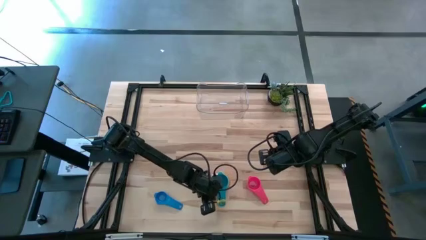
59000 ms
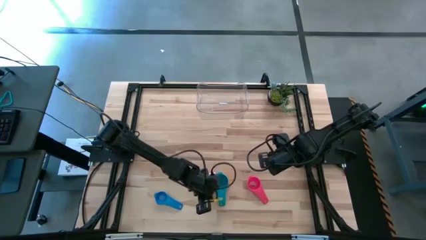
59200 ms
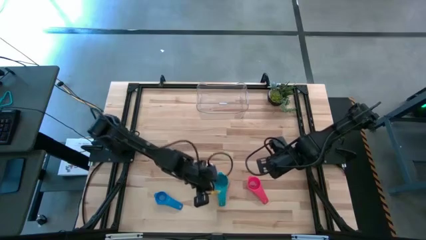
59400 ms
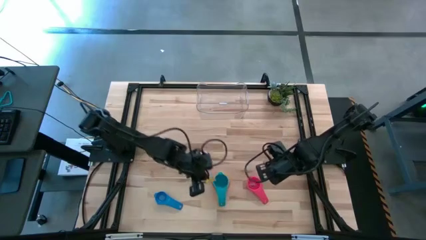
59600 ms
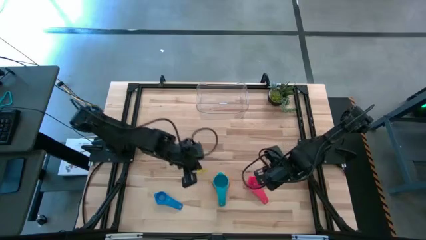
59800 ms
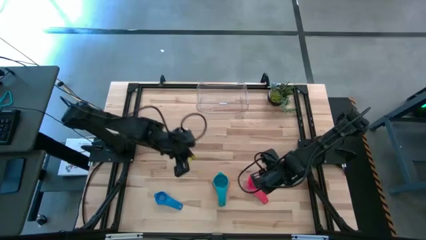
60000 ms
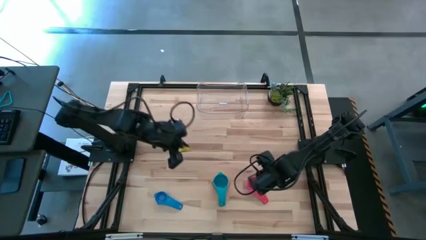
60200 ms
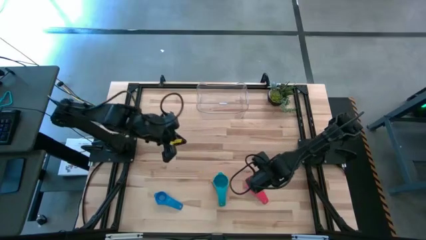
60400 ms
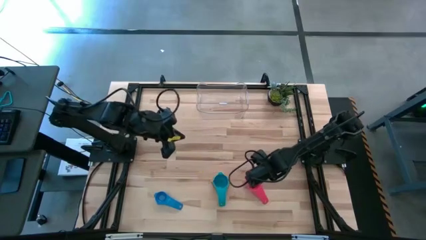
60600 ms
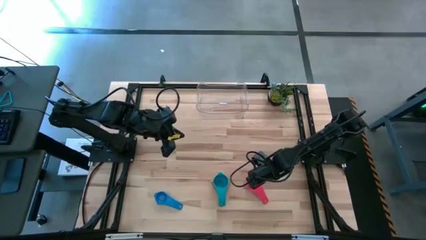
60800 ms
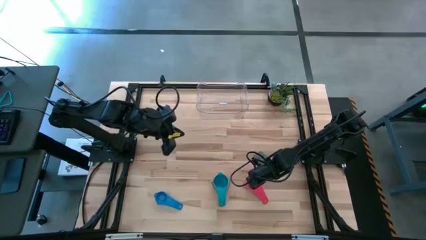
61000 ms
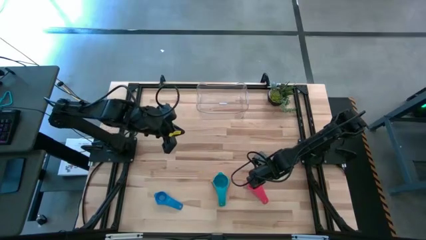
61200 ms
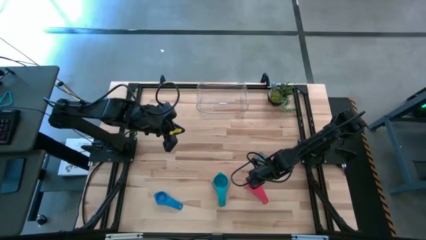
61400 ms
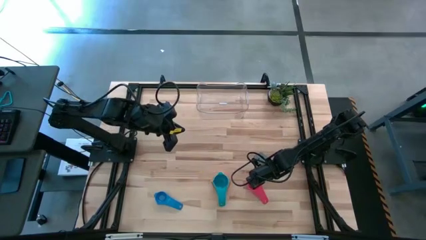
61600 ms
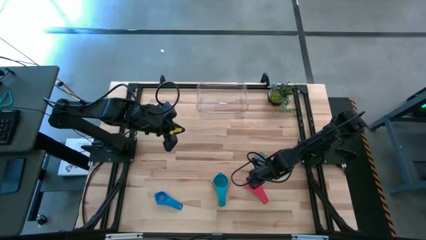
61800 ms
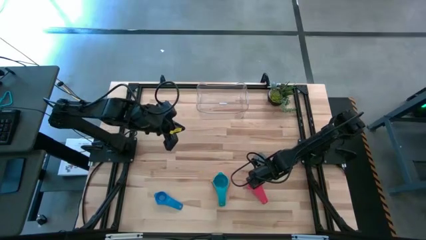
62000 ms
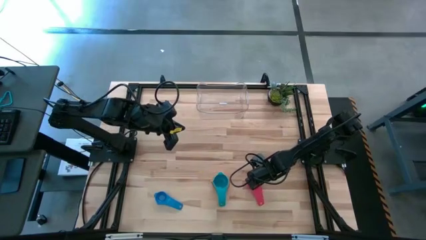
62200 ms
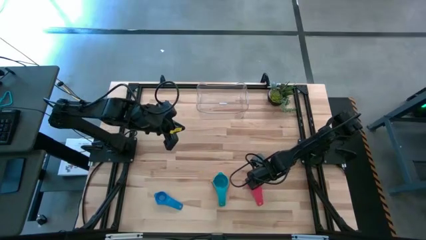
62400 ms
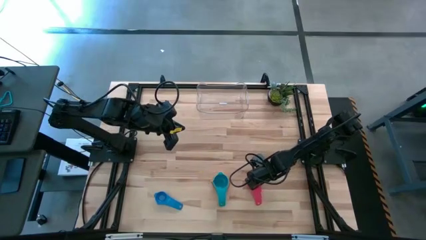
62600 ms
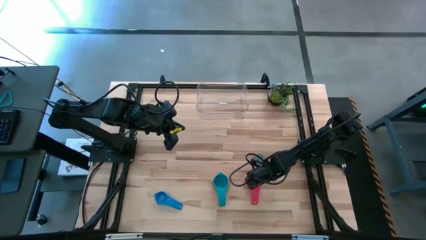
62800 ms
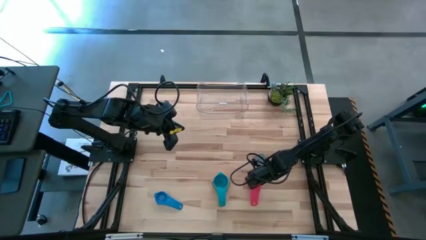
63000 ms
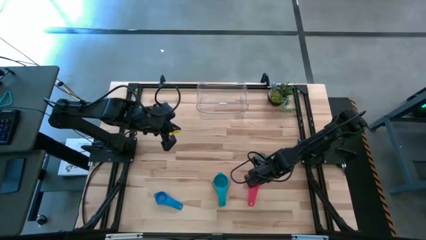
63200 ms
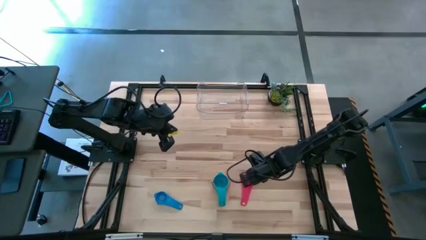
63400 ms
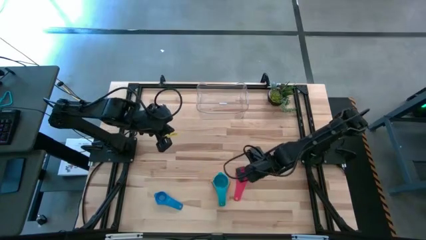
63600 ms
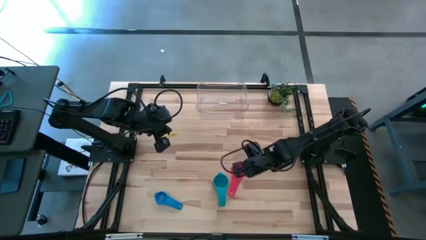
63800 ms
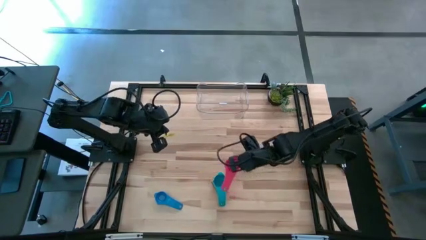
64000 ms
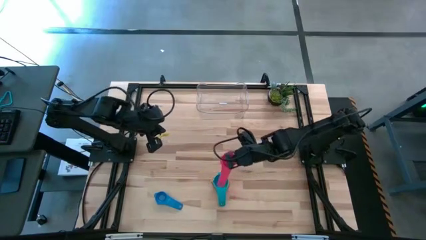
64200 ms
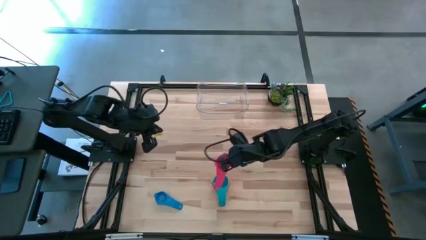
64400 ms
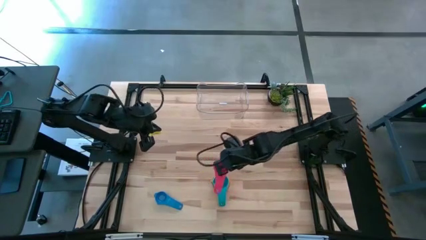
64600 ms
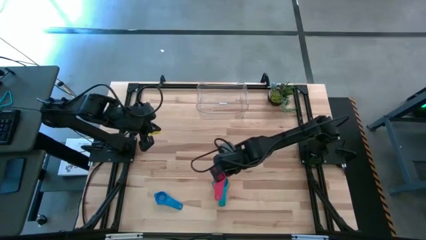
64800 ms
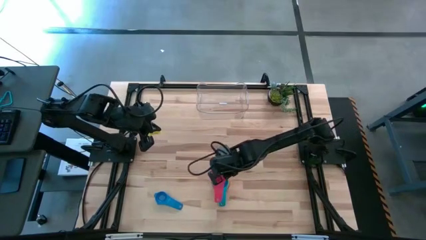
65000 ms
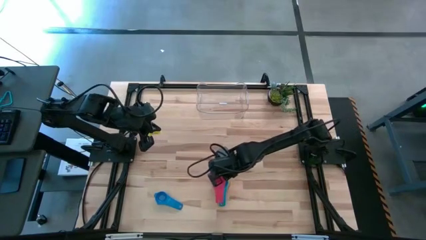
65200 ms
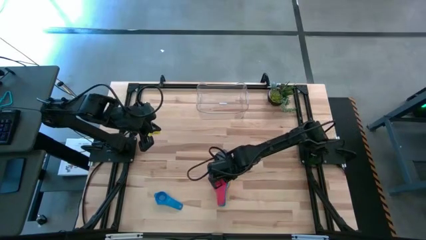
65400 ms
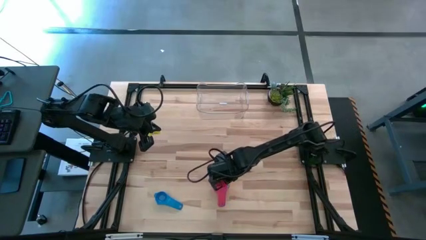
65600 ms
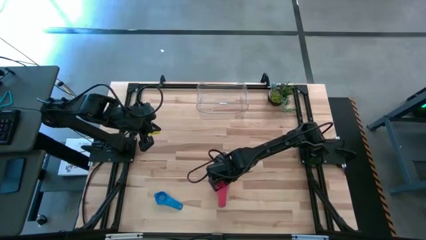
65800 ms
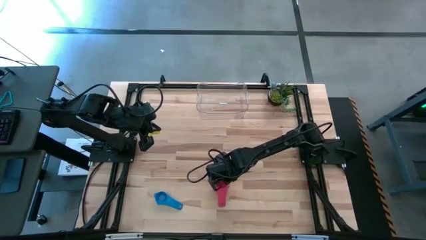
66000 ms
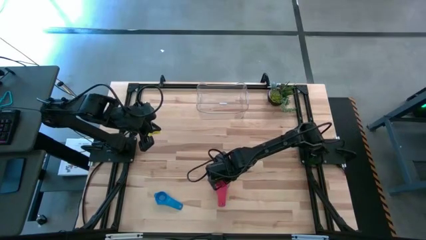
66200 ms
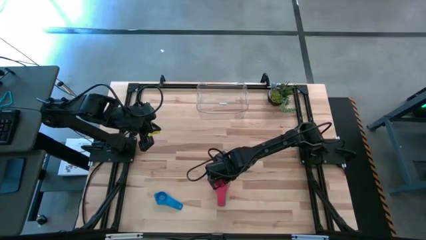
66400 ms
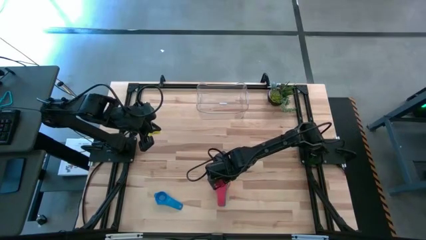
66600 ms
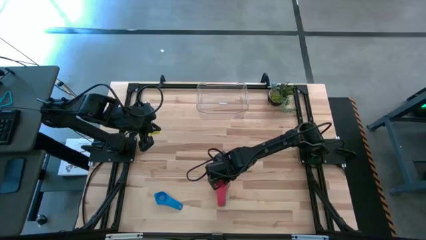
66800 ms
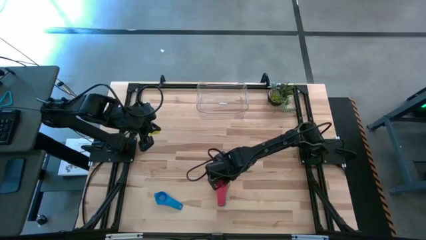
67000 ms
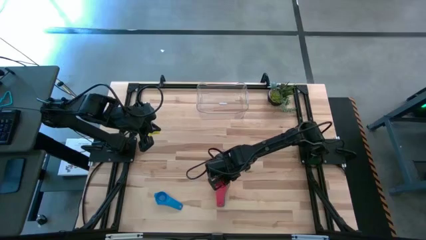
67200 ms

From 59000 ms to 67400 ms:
Task: Nest measuring cups in basket
Stack the red measuring cup on top of the light blue measuring cup

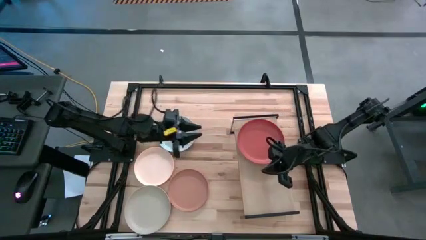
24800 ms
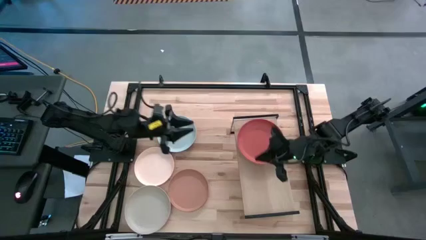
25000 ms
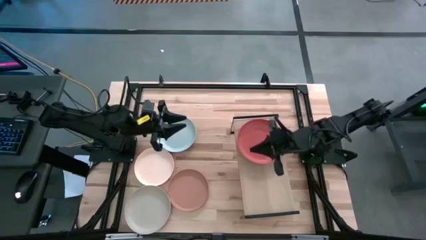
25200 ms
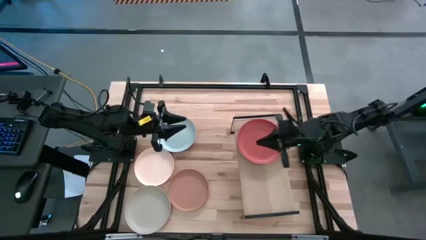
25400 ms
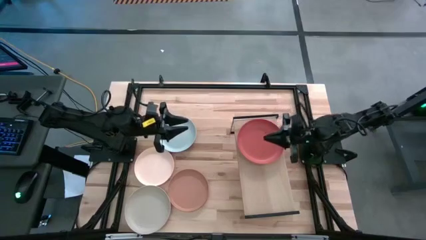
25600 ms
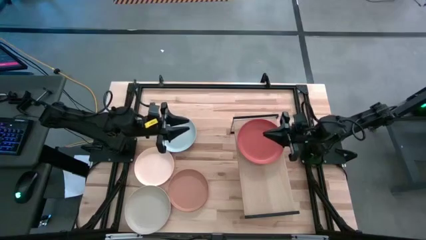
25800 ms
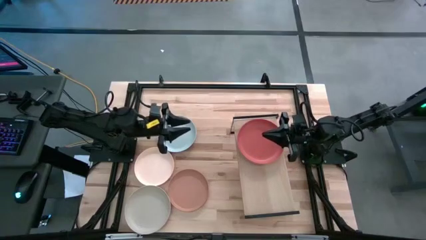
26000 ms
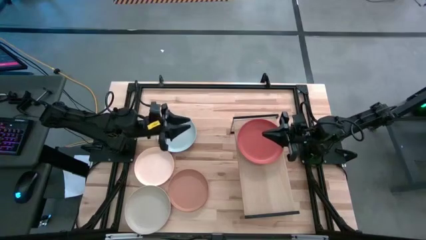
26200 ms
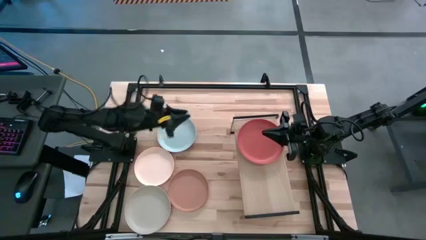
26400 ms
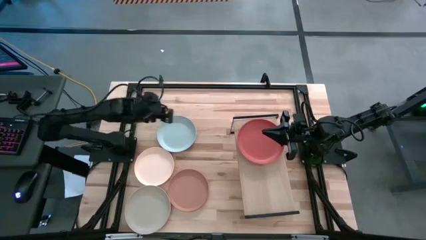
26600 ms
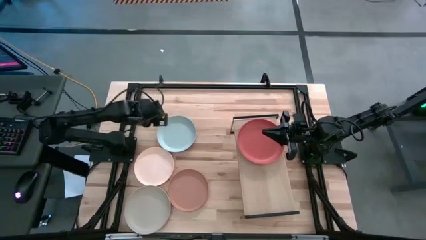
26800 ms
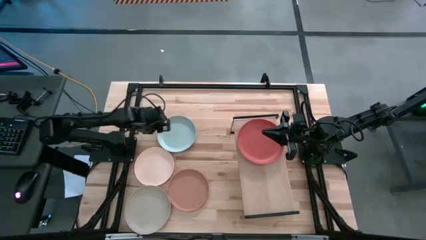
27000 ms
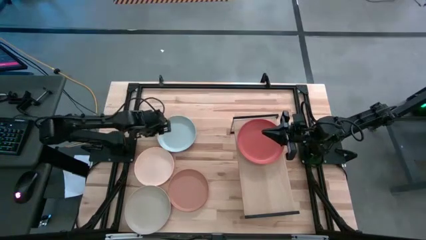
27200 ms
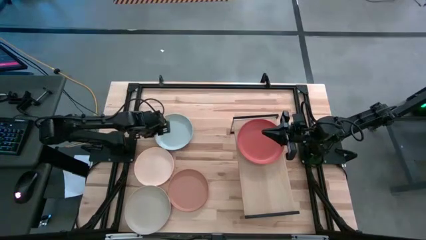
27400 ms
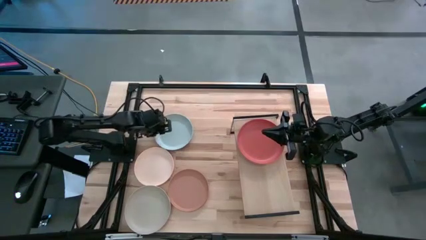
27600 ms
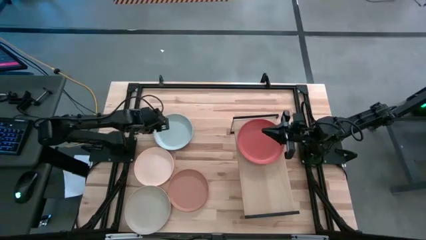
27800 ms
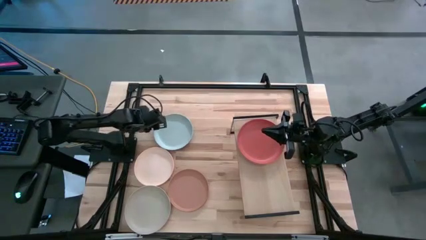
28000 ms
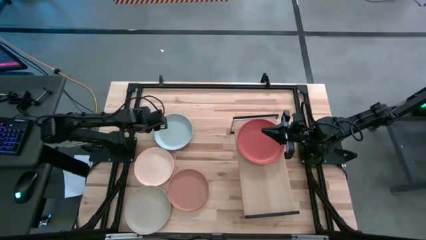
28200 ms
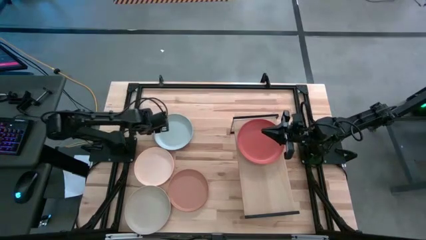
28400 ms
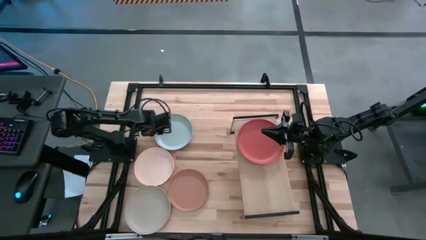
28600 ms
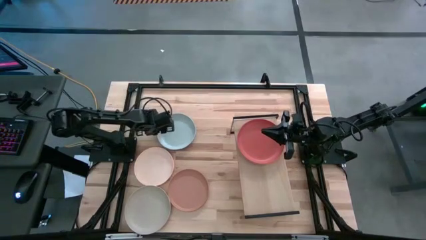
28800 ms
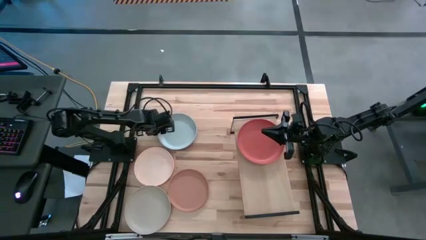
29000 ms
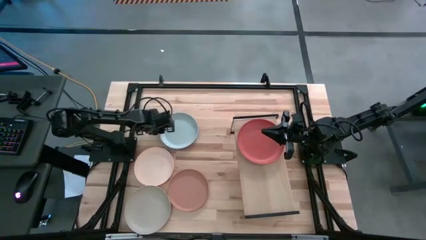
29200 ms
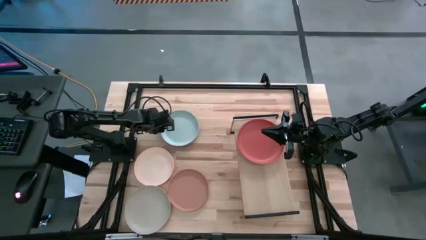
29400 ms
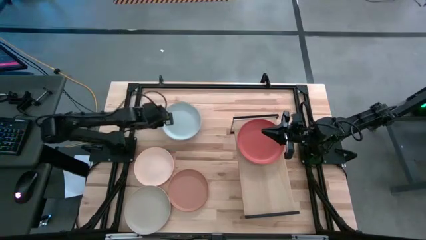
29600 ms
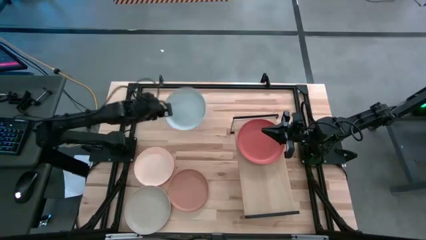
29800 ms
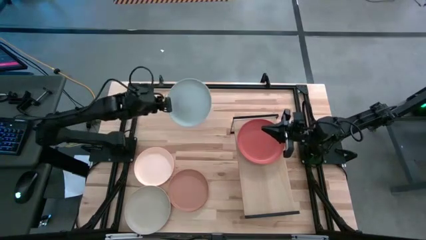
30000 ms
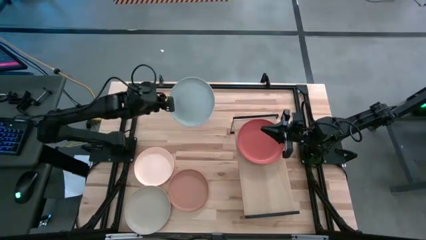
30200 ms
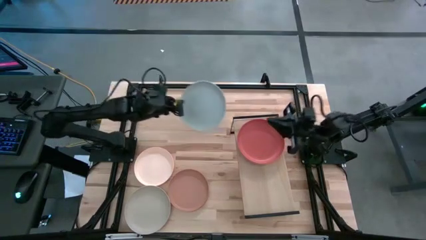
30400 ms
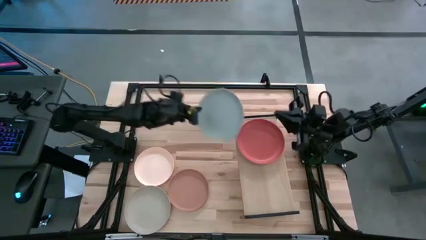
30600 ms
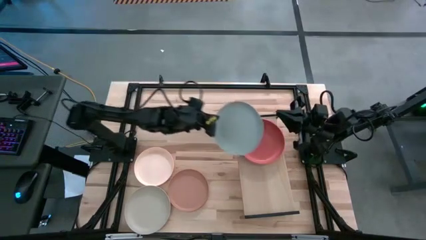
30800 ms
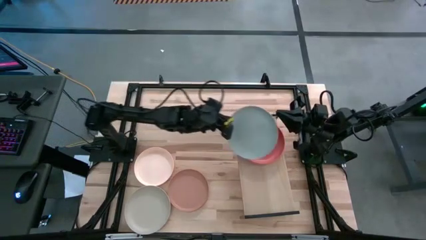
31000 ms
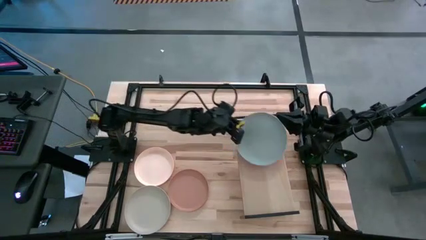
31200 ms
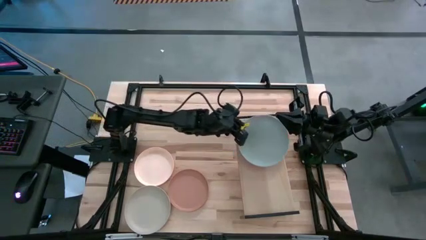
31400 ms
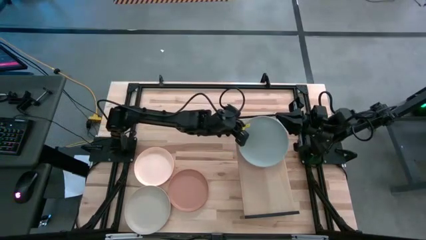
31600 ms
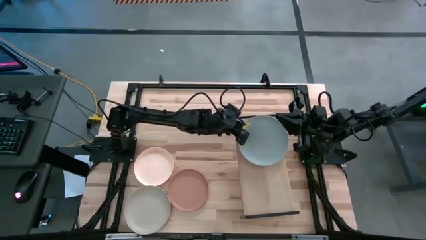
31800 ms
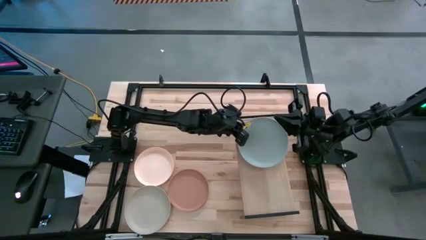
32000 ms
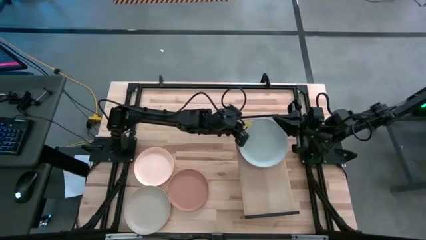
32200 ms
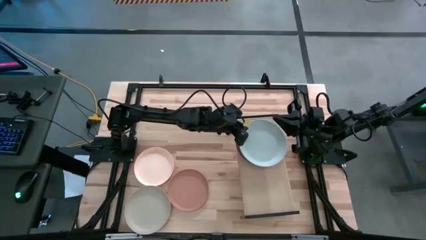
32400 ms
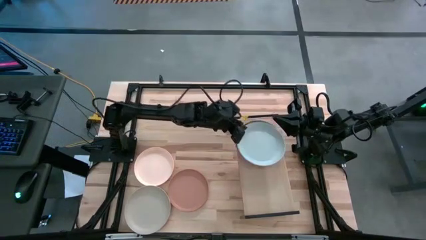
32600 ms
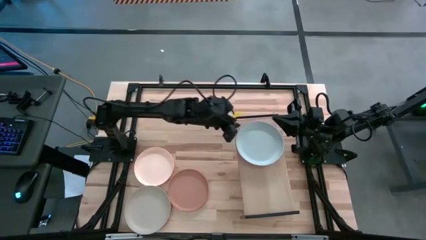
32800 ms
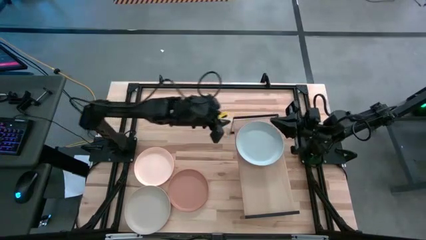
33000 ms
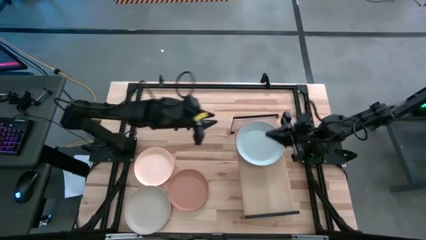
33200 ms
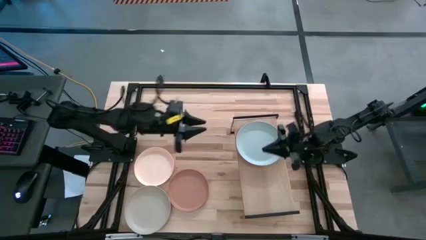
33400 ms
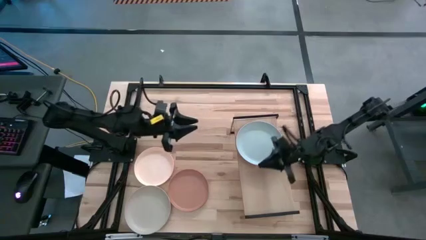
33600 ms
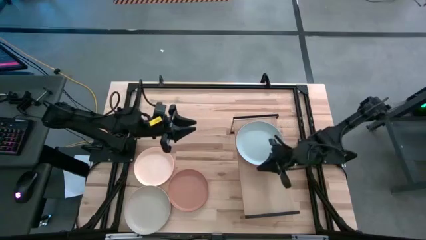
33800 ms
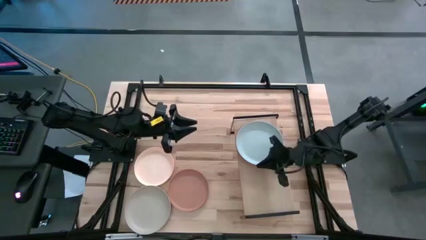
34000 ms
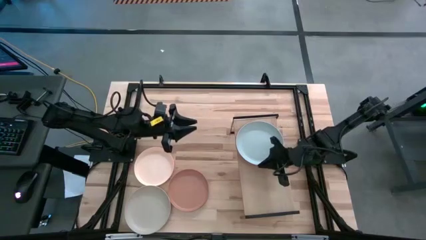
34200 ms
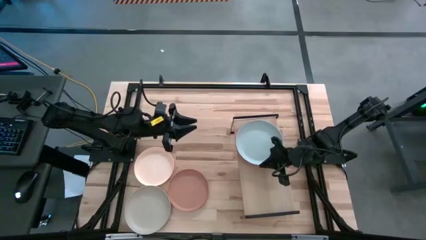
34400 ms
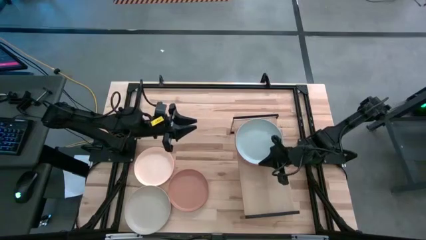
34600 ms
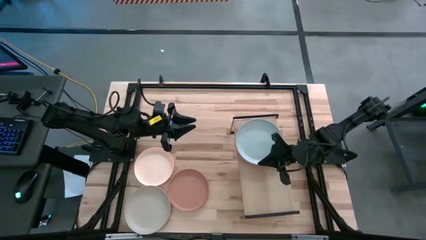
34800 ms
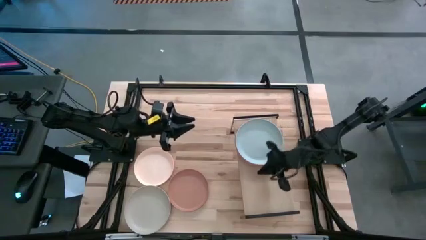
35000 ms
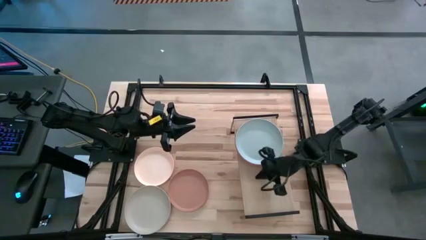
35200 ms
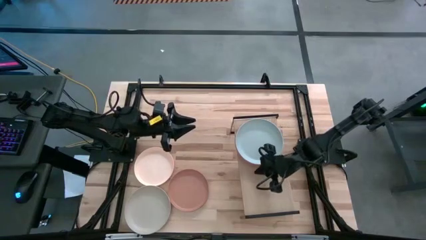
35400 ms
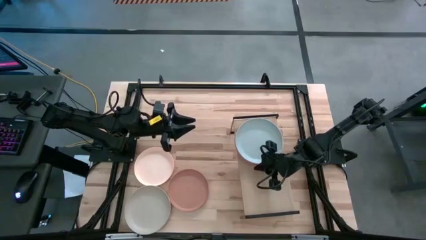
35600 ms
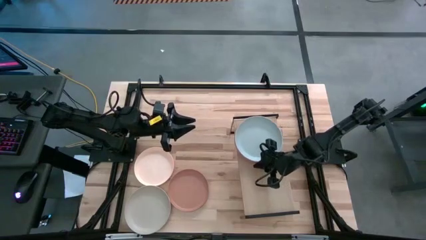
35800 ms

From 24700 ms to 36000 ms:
Task: Place and stack plates onto a shelf
Stack the blue plate on top of the orange plate on the shelf
